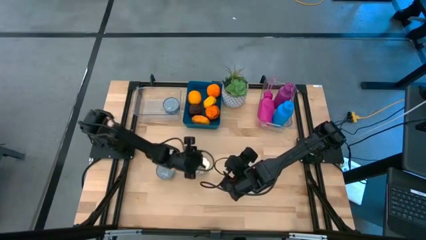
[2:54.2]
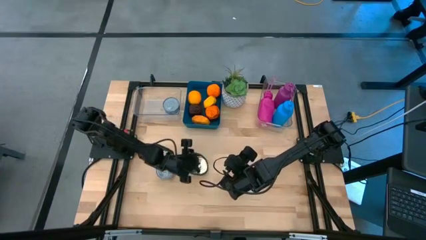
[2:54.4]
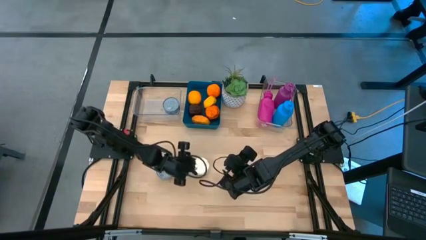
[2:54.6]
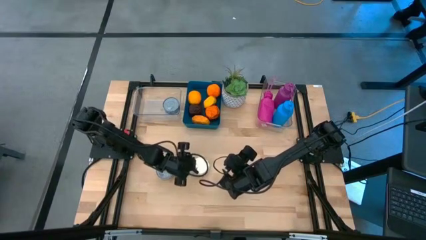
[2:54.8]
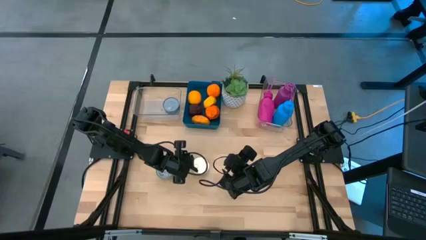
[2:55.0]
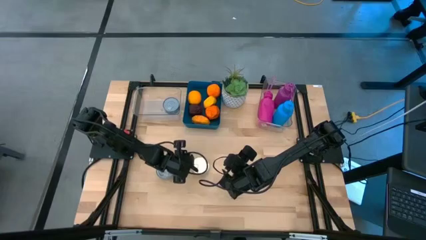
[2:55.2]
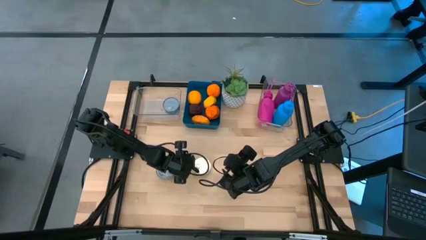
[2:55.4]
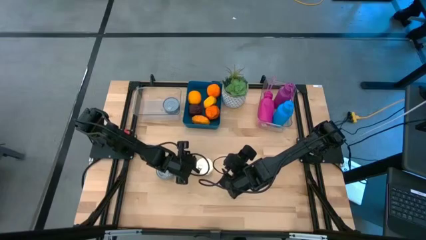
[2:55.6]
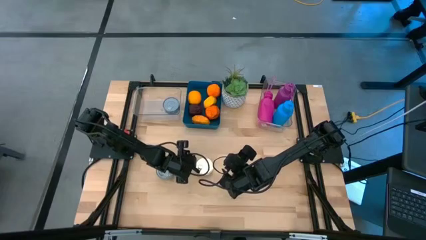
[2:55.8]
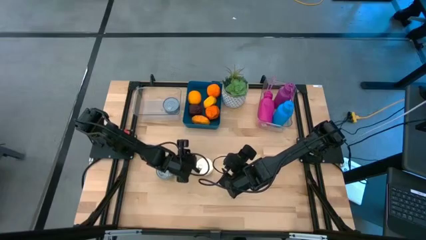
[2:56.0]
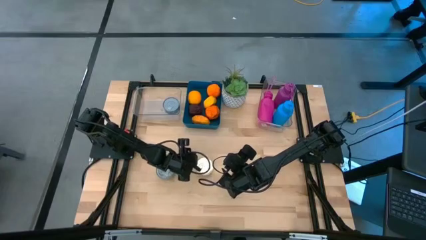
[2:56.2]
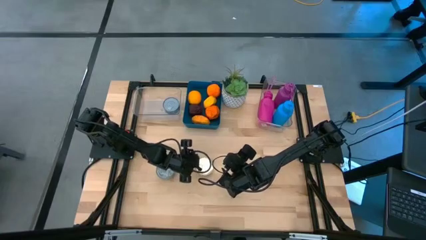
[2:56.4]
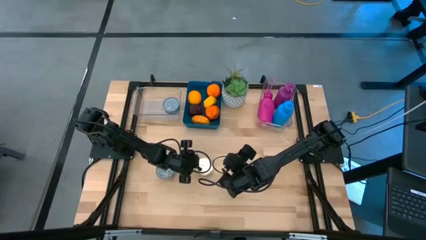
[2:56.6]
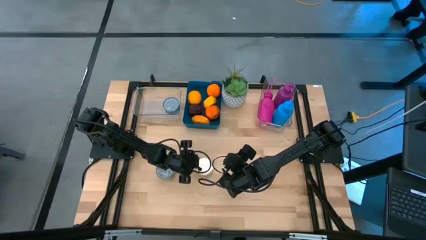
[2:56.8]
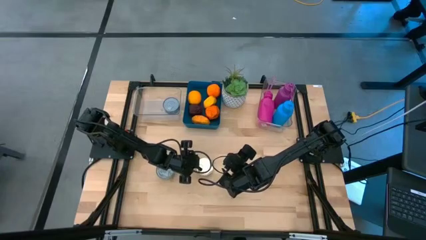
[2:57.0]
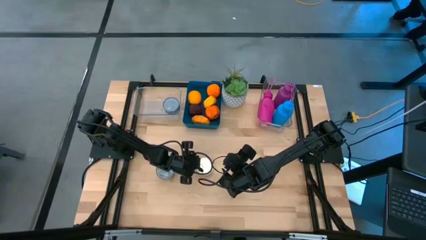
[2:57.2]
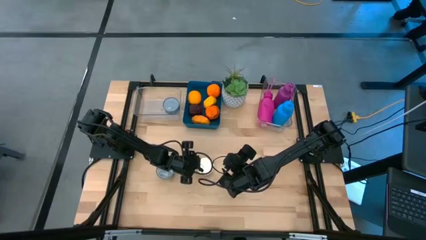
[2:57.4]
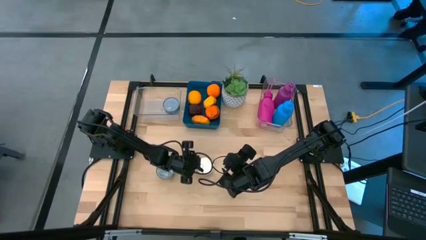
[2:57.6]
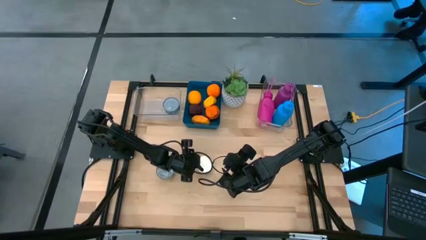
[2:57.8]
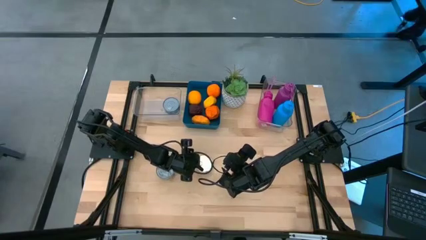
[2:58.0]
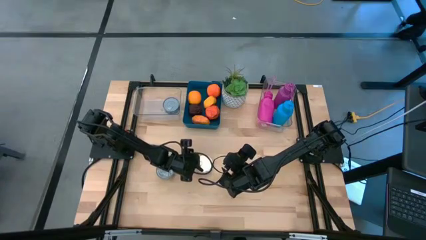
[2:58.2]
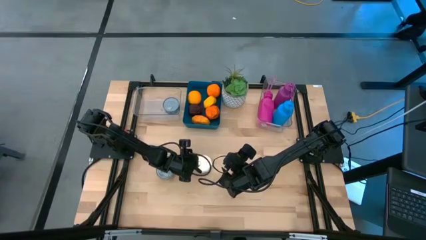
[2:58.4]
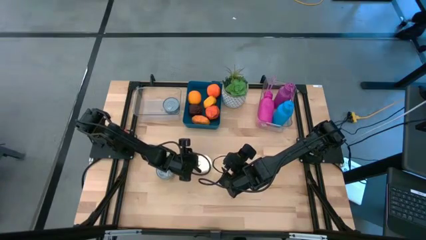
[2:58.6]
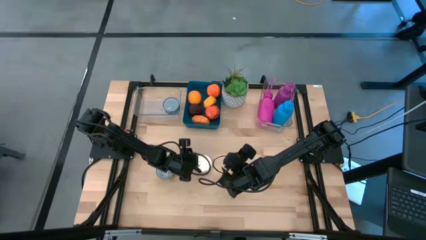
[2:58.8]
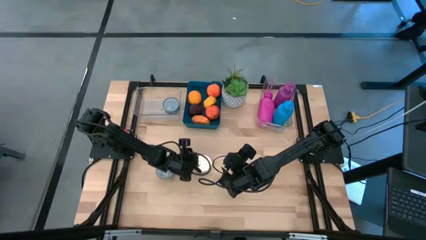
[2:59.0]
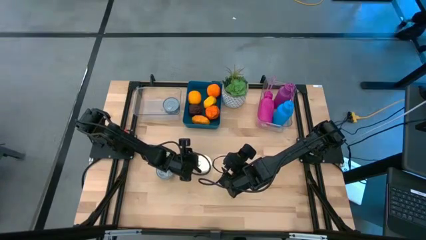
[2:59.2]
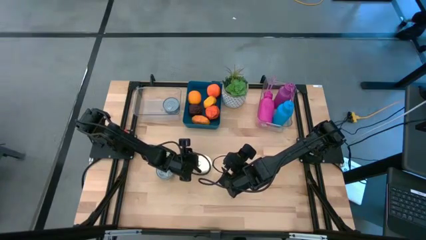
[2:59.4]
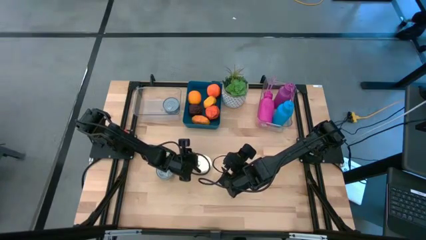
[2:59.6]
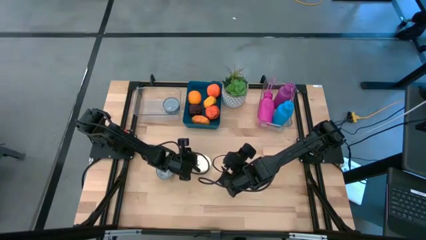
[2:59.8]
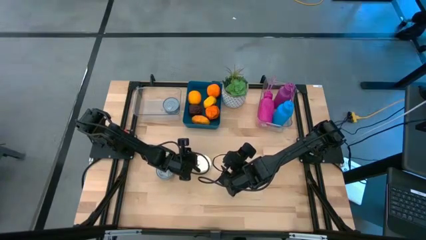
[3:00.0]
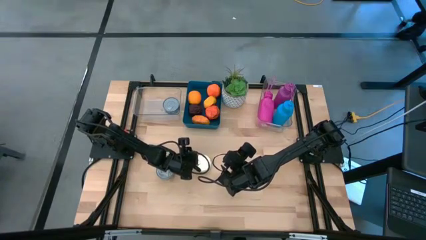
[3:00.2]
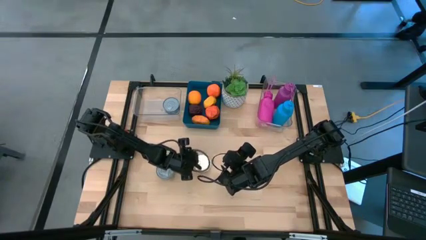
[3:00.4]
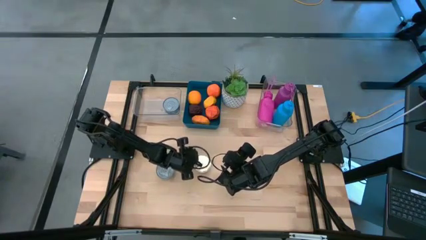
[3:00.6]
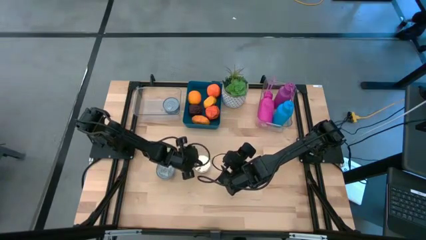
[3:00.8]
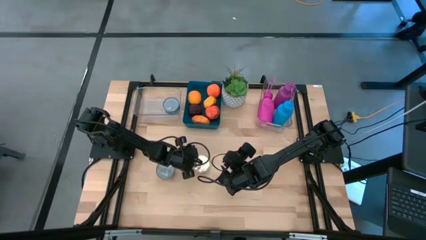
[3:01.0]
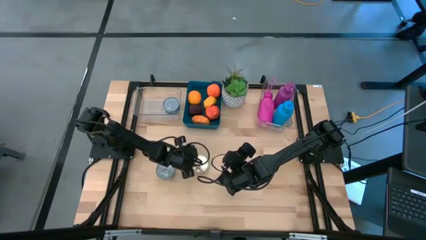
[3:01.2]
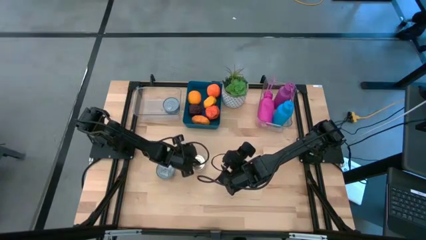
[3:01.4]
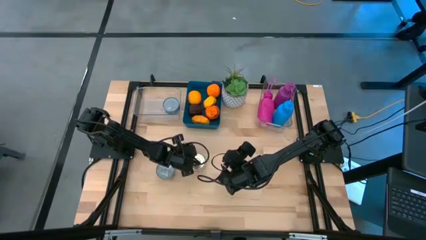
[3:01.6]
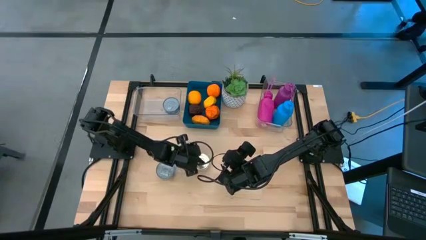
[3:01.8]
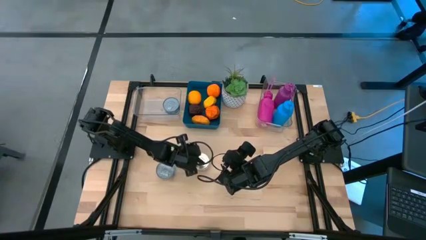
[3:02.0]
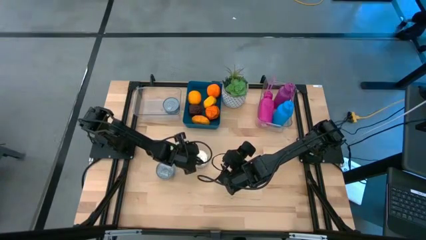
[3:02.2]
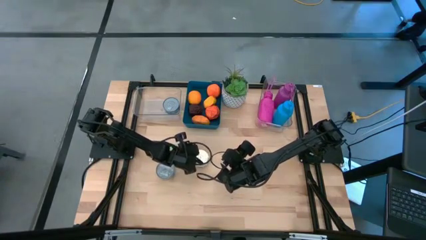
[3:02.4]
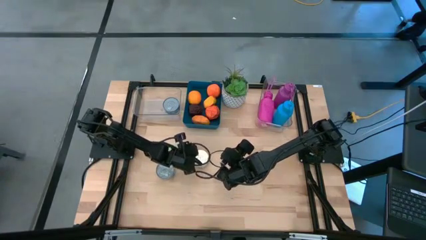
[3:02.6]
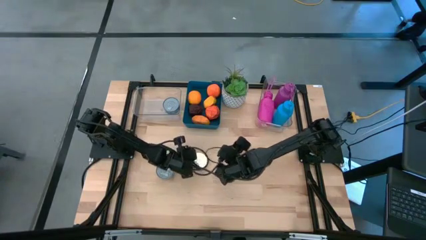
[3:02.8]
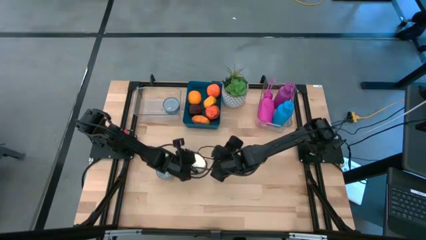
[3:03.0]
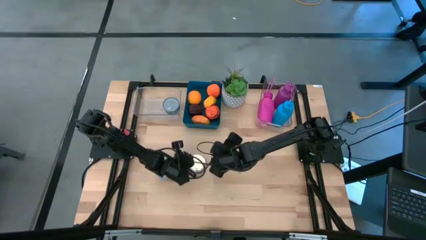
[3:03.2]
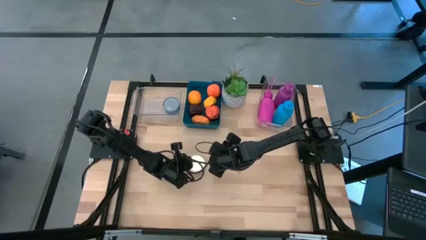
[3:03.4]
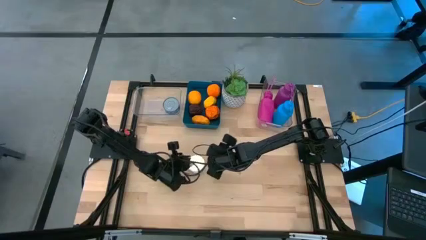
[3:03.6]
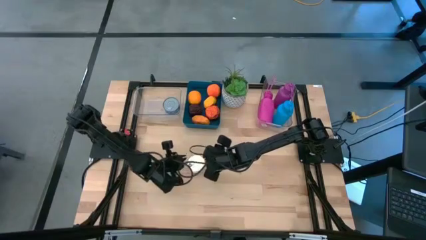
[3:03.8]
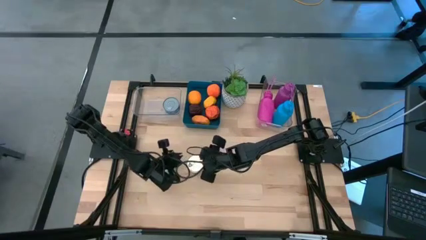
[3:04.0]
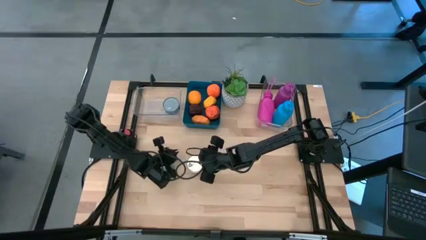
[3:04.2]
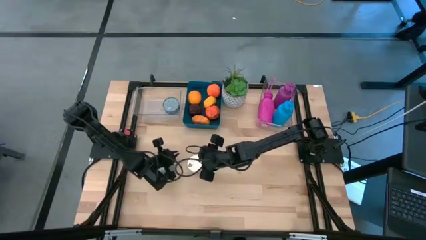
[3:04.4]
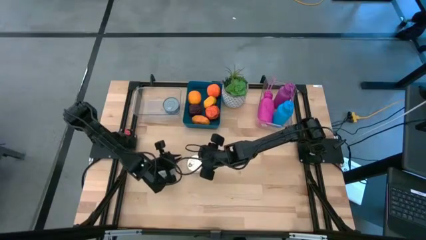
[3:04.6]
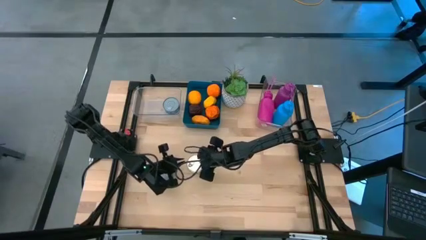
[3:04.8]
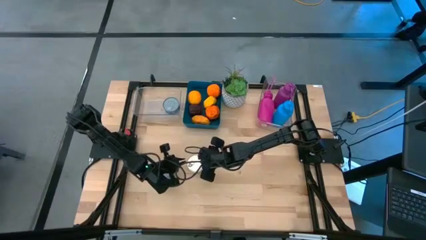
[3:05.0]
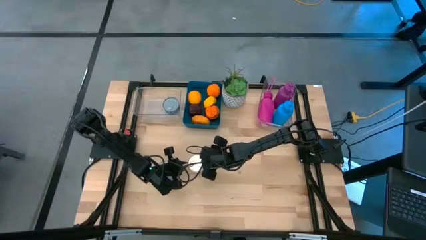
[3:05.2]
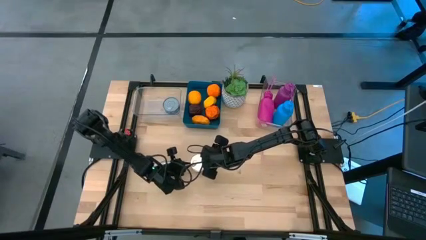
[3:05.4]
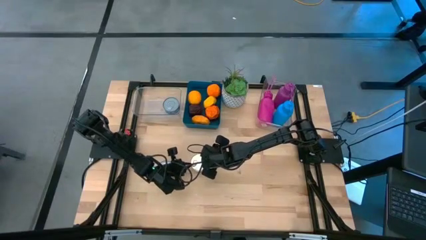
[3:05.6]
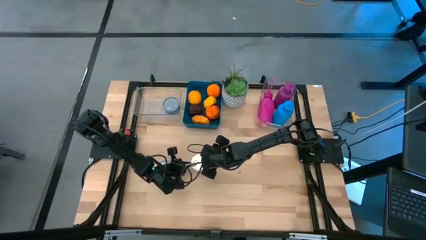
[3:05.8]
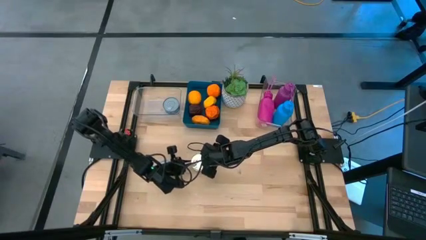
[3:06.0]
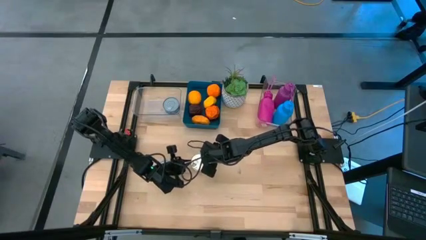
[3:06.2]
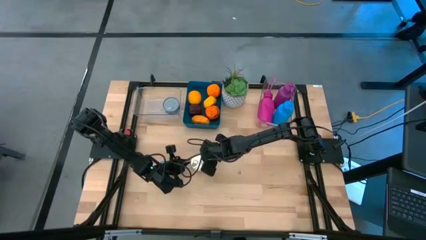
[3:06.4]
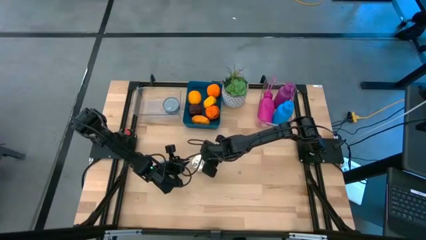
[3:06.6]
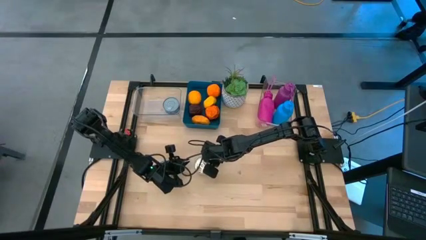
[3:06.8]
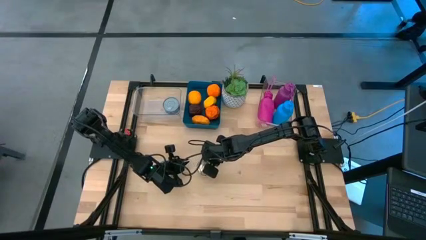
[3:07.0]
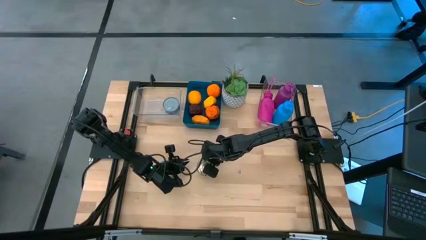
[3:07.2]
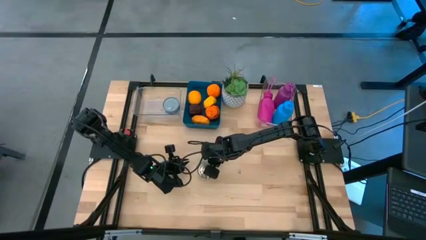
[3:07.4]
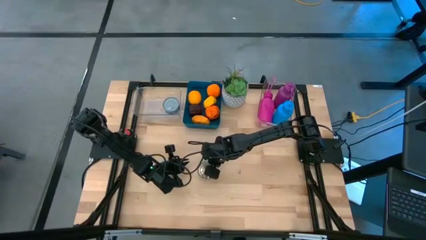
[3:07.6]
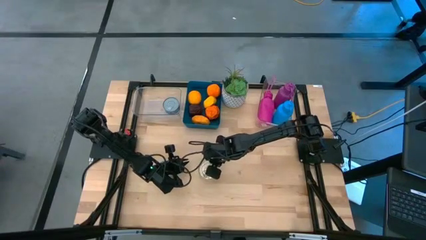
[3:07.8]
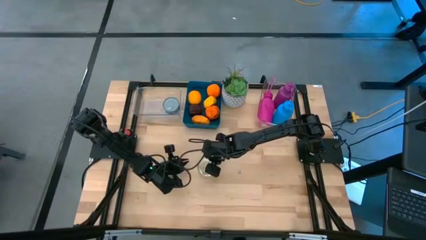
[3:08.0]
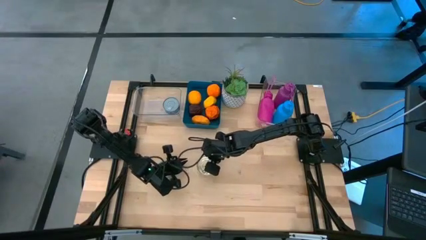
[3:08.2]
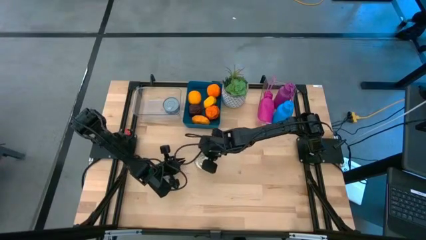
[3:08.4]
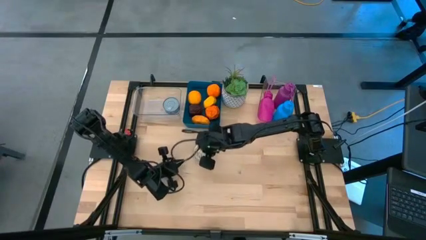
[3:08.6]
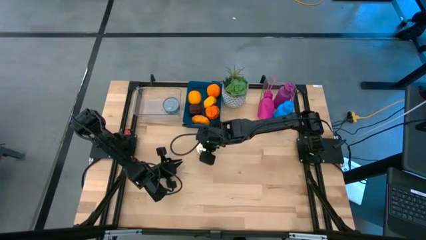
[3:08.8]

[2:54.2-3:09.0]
Task: Pick & Place Food Item
Stack the blue and pink tuna can on top of the blue tuna can into the left transparent bin
